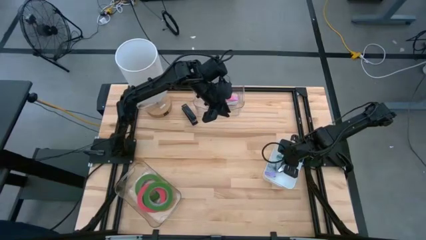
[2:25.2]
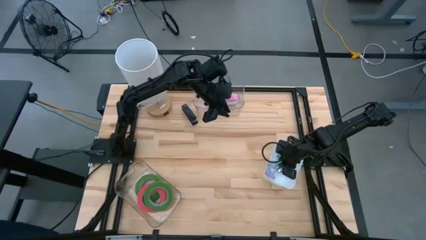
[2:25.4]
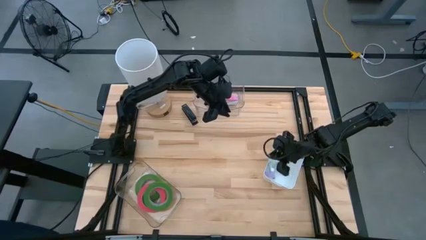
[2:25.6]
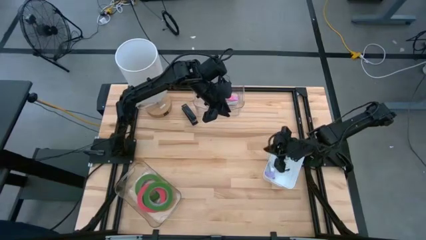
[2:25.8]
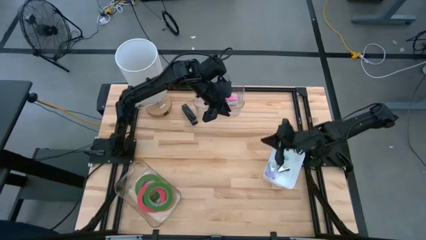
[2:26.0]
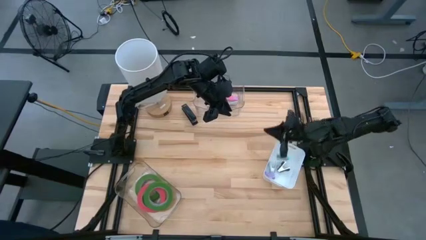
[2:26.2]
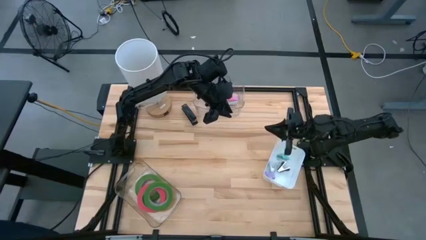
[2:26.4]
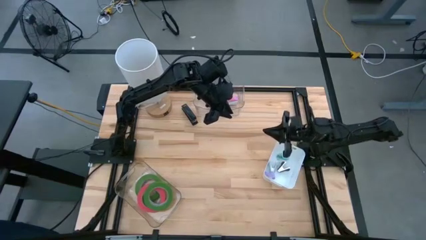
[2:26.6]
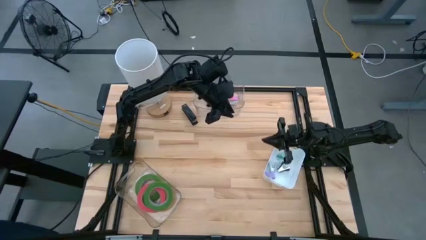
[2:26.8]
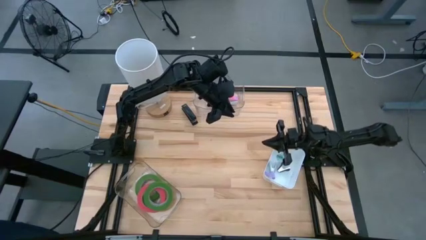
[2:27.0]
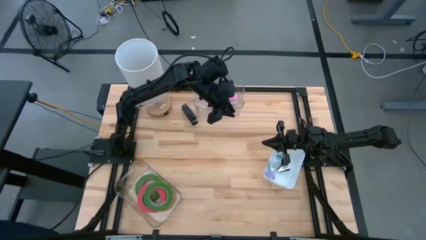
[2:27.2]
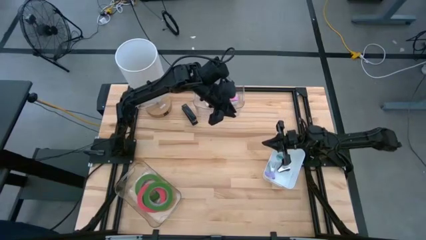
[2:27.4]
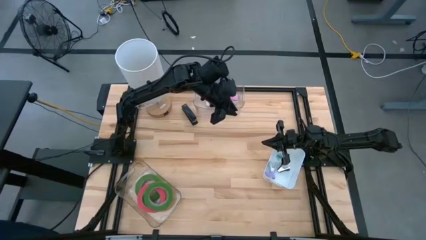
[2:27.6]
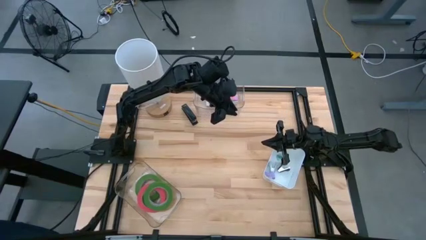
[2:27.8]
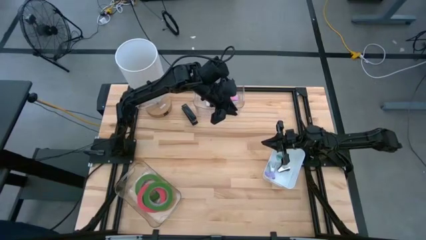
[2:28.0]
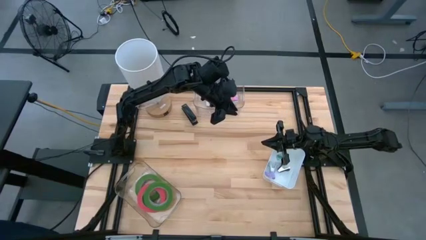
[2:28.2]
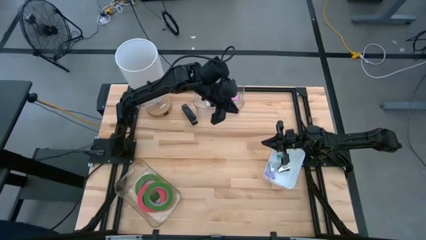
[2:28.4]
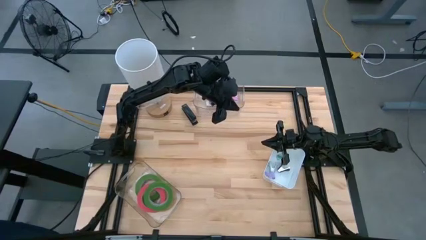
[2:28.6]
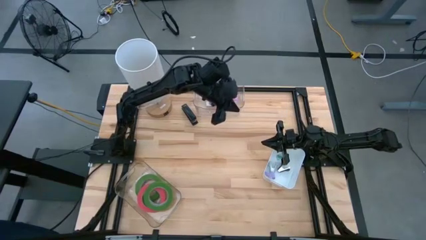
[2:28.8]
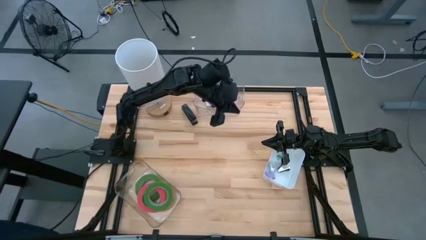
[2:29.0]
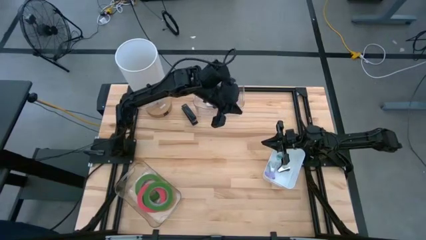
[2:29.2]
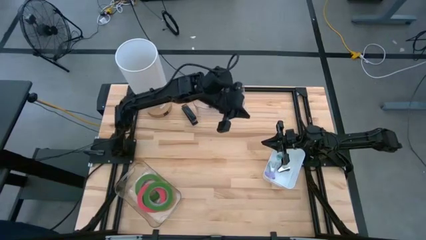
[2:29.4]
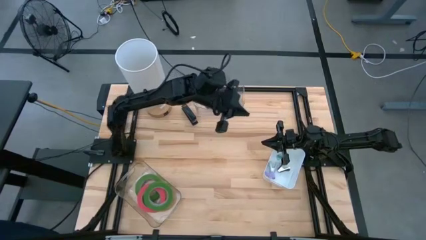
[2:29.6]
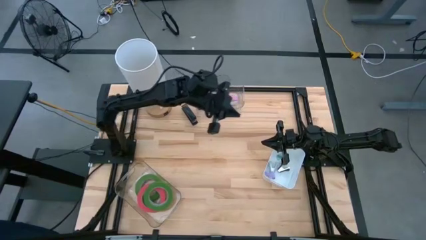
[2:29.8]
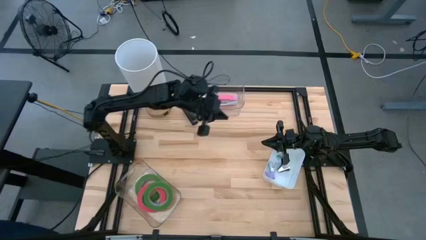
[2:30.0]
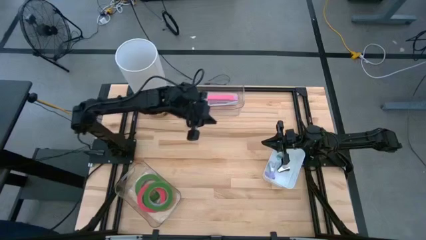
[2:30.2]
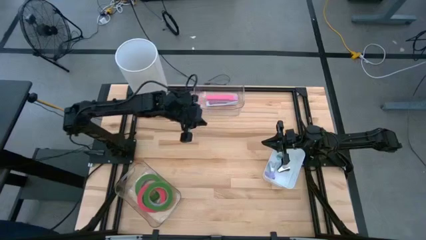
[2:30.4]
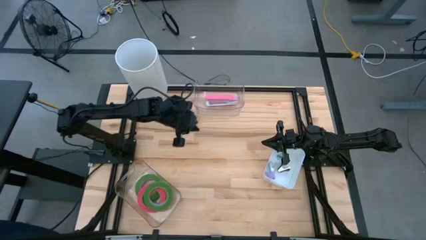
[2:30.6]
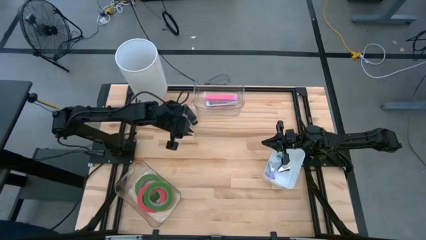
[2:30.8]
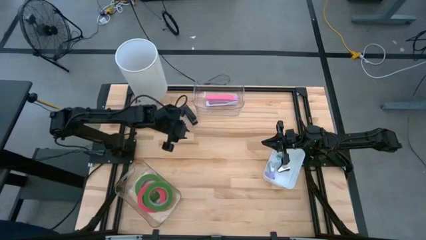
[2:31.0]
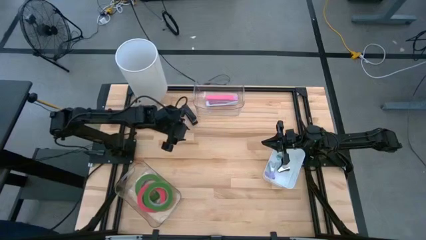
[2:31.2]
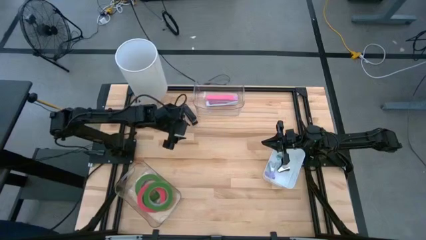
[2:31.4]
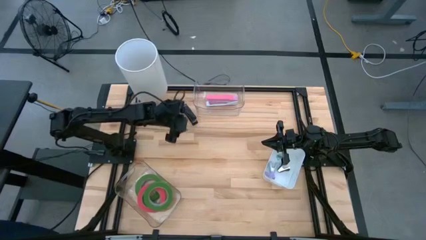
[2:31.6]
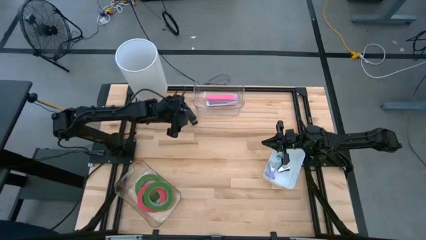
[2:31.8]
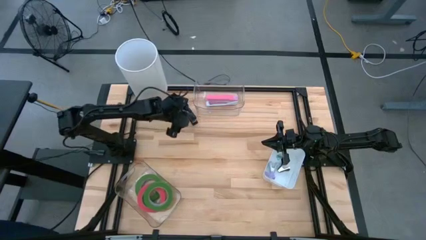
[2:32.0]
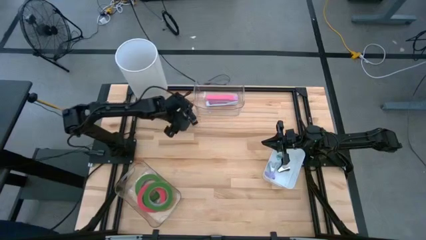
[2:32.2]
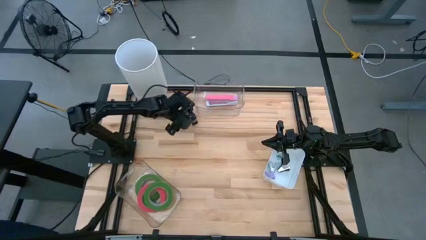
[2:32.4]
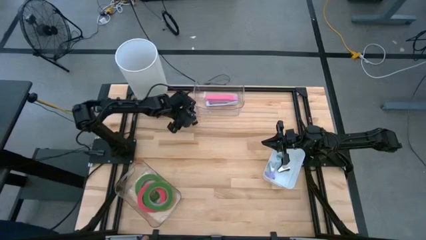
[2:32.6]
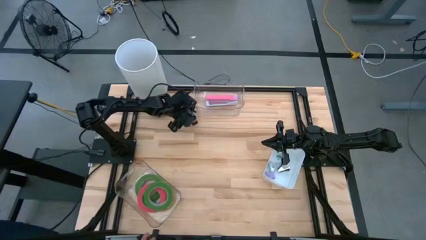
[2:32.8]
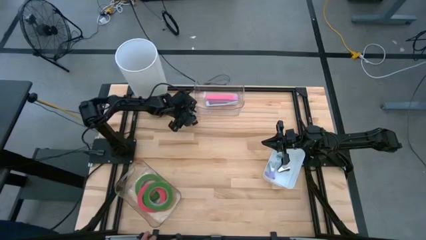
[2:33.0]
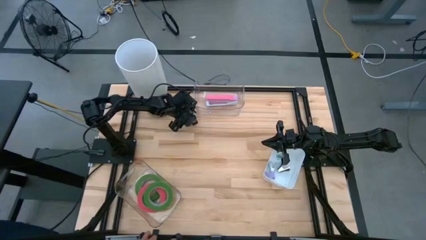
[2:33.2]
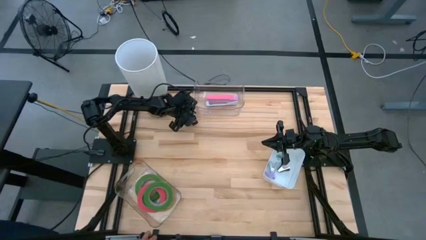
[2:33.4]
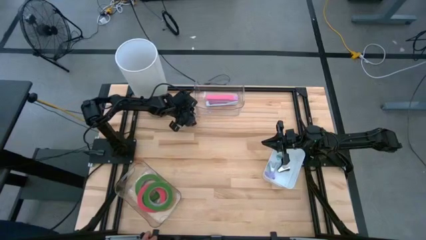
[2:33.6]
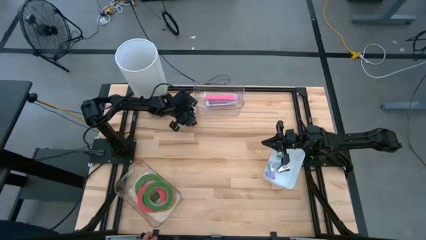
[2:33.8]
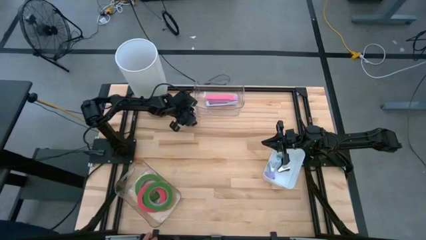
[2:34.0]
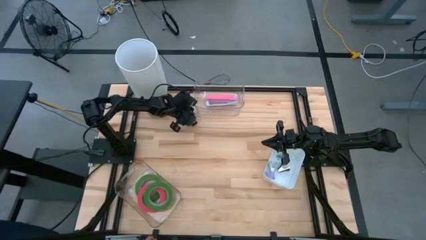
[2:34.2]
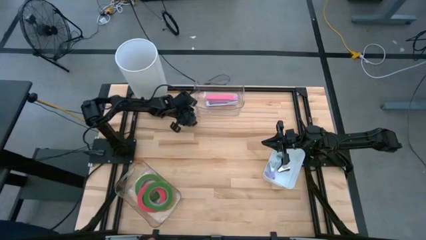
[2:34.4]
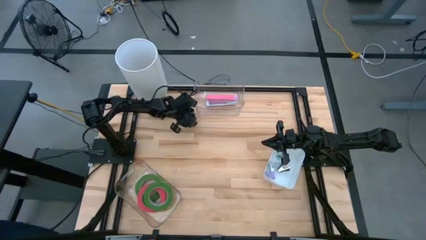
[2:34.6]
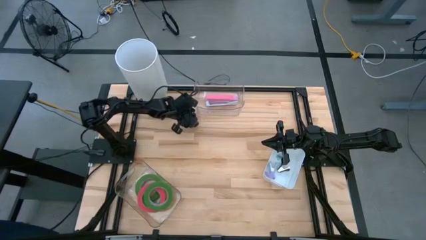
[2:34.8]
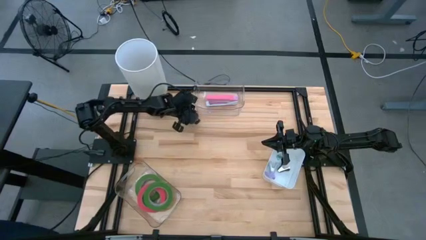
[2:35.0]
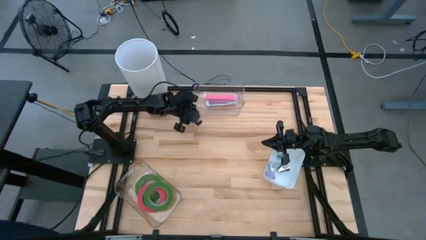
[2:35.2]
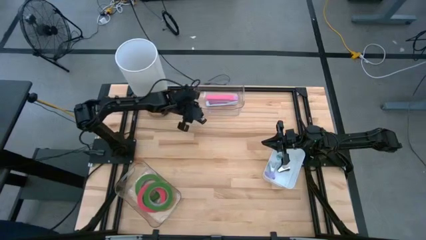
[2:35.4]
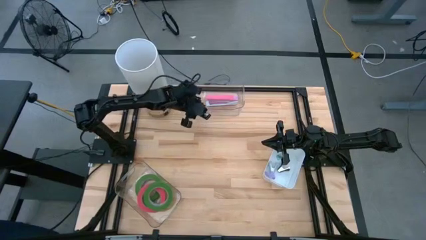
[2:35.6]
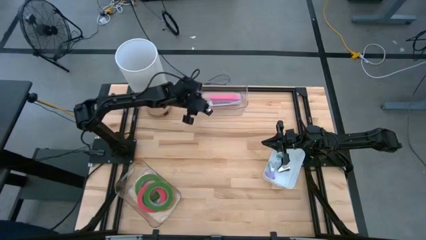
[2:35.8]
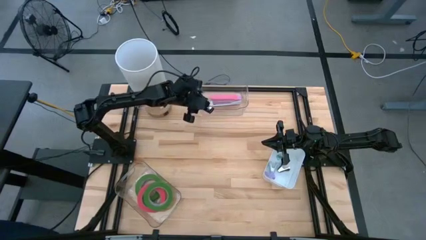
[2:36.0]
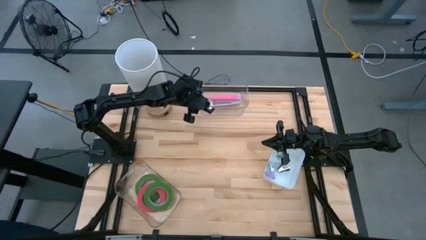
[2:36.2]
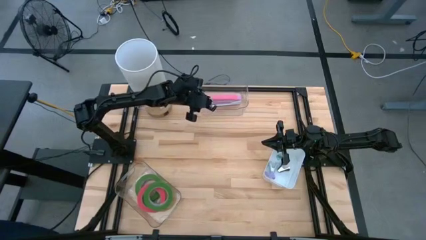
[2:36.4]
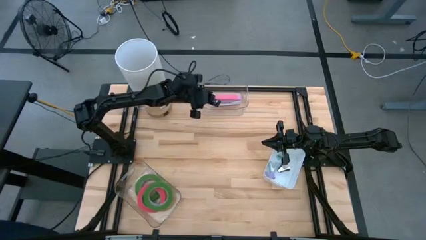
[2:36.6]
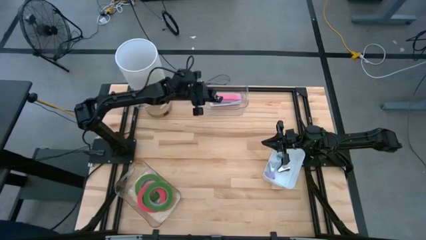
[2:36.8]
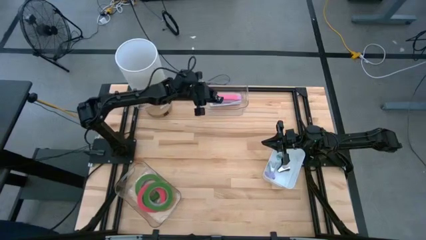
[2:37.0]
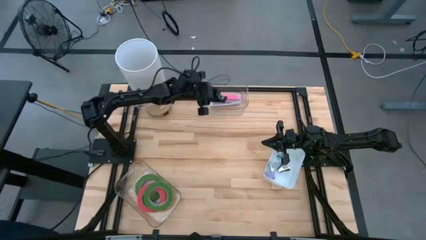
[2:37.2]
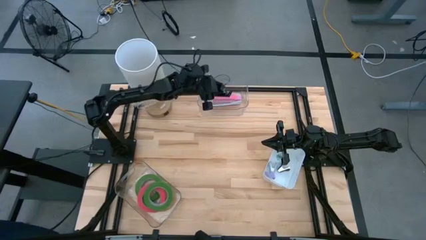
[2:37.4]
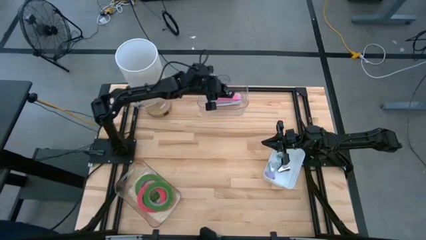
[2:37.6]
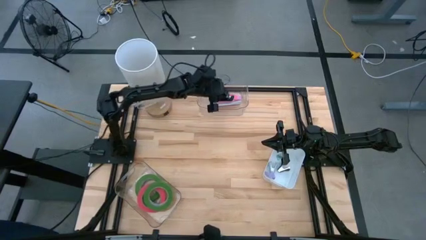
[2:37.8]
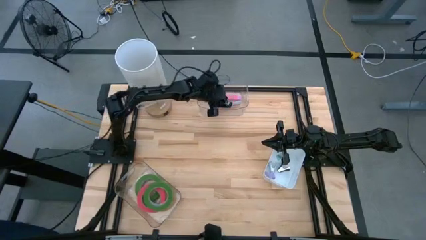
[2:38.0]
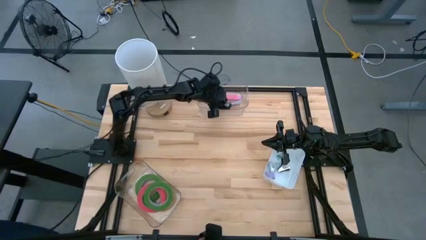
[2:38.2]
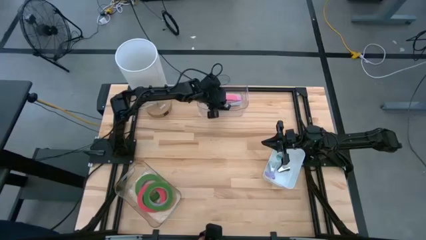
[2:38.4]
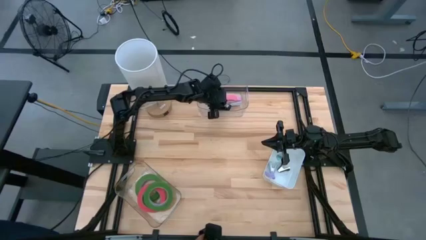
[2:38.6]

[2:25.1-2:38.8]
Task: Pick and place Stapler, Stapler remover, tape
Put the black stapler into the top transparent bin

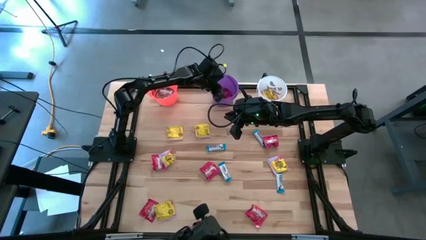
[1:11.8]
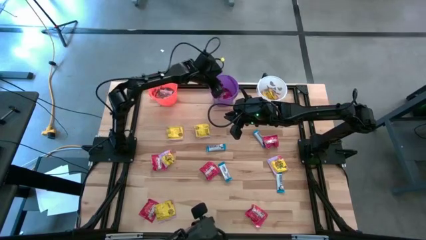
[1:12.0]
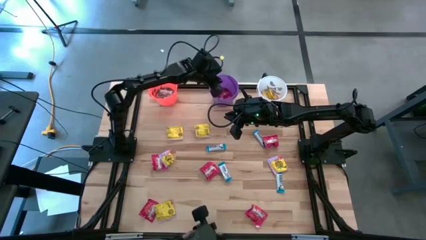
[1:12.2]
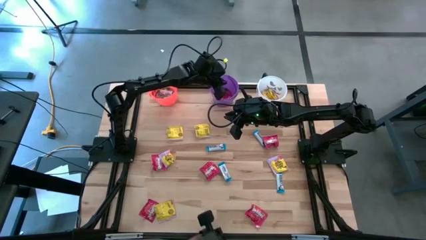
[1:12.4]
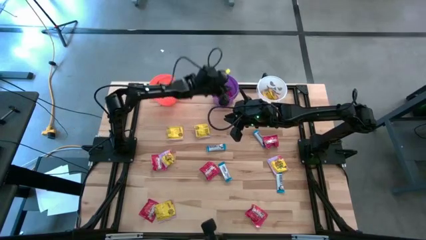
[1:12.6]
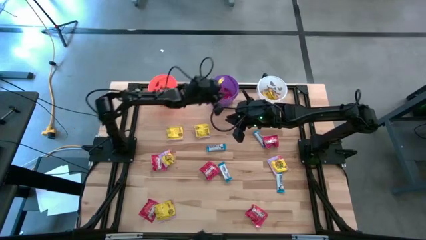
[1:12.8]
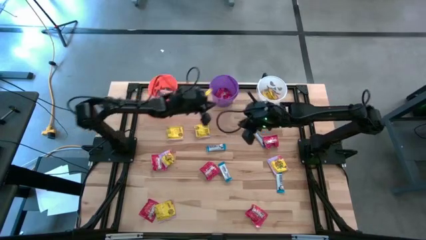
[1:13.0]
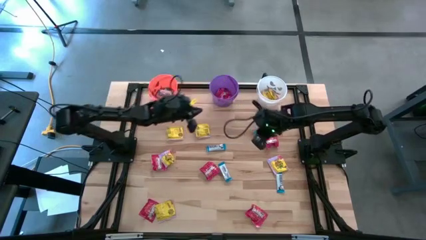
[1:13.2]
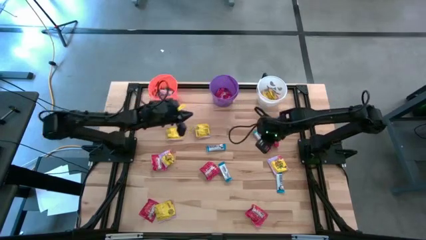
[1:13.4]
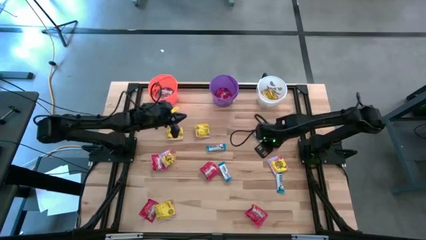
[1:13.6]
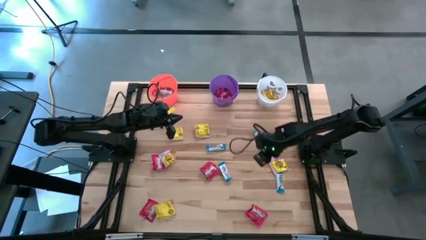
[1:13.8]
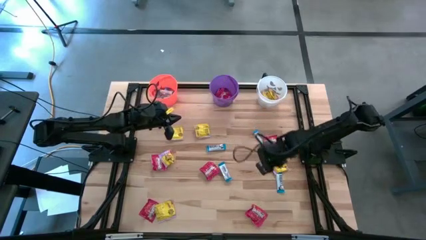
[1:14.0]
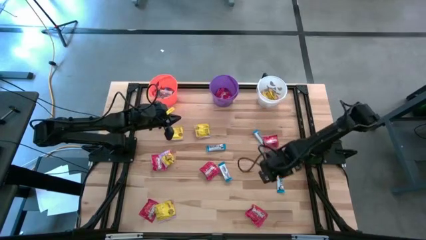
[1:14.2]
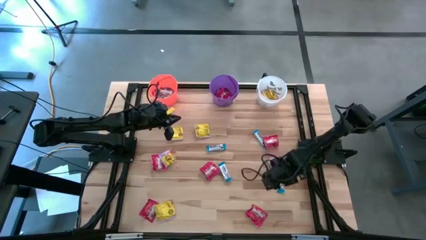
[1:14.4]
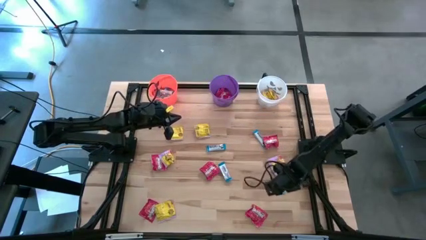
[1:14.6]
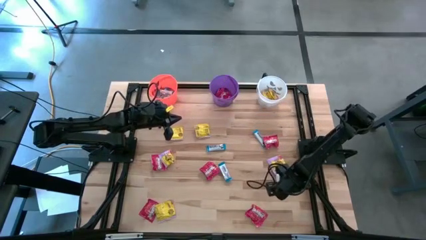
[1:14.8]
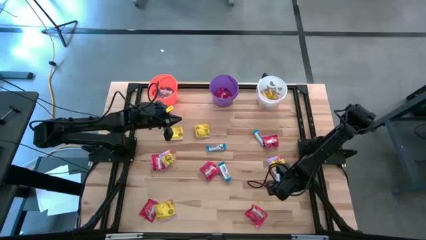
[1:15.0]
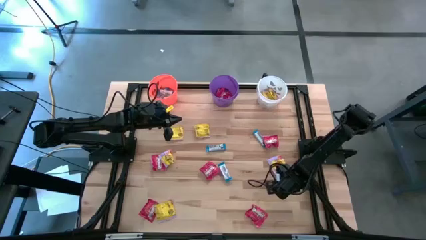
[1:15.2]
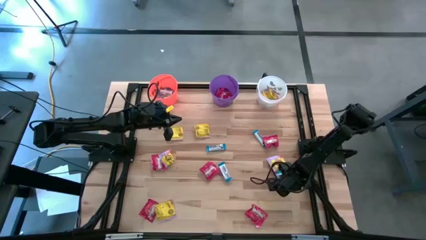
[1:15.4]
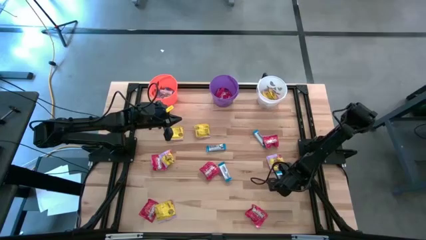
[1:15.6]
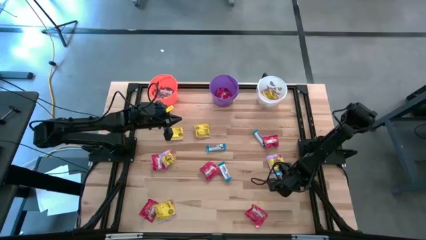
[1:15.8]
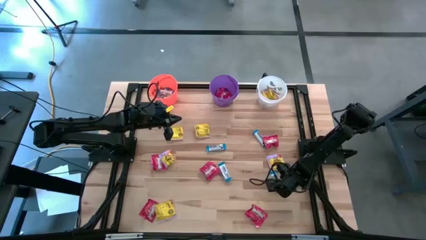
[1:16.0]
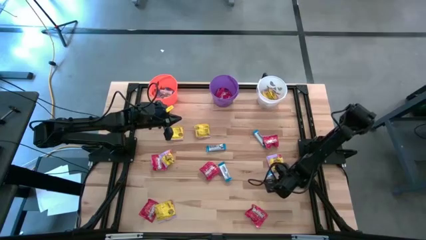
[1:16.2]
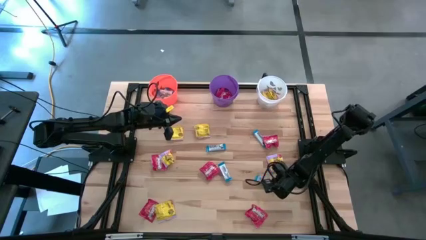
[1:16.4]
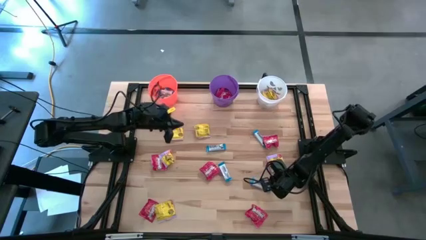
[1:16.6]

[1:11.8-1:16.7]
Task: Sort candy
Put the white chocolate bar into the orange bucket
